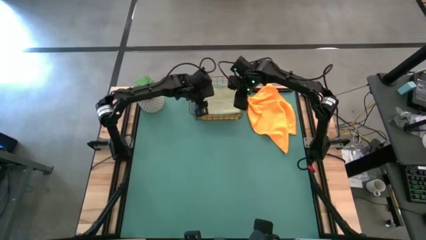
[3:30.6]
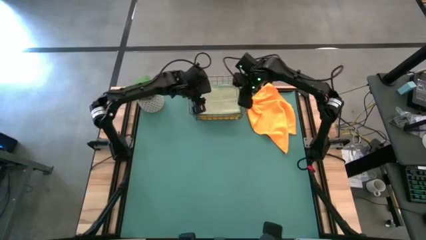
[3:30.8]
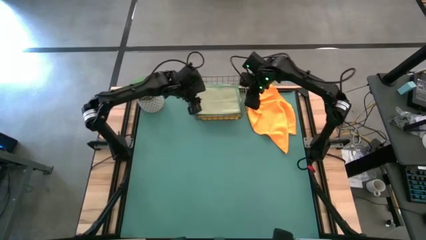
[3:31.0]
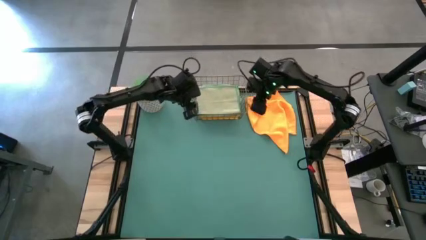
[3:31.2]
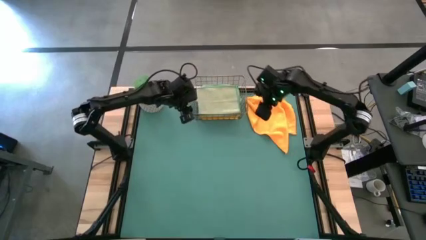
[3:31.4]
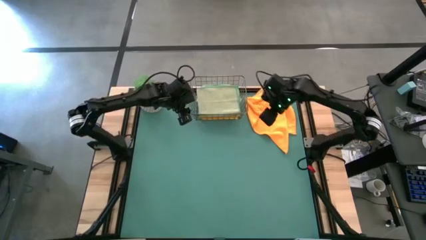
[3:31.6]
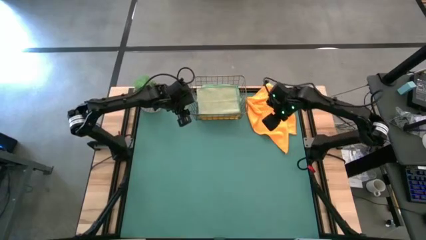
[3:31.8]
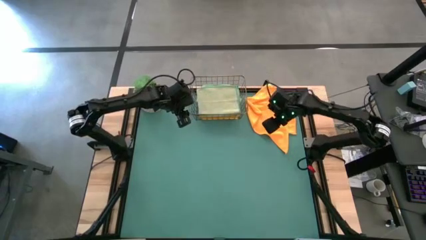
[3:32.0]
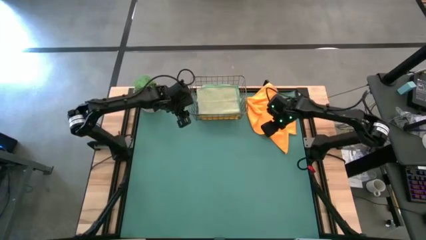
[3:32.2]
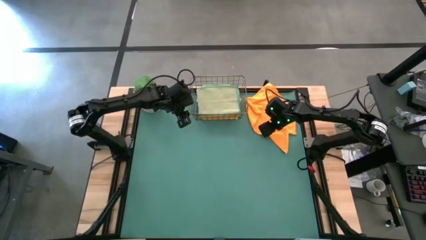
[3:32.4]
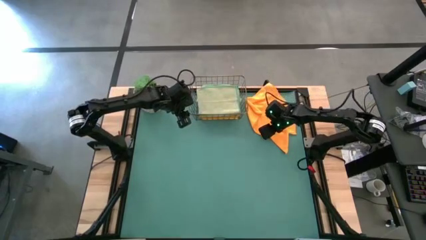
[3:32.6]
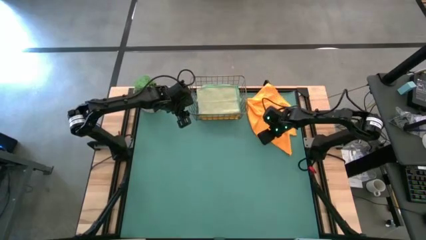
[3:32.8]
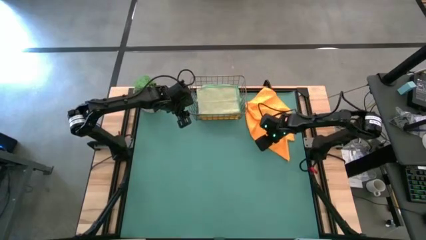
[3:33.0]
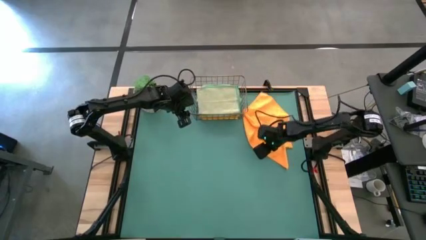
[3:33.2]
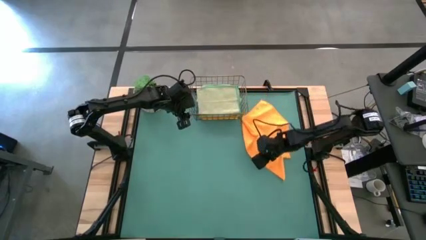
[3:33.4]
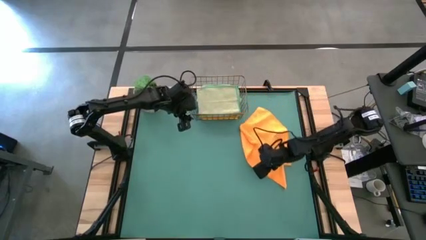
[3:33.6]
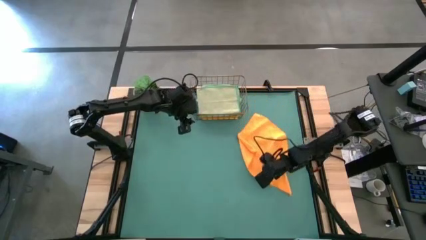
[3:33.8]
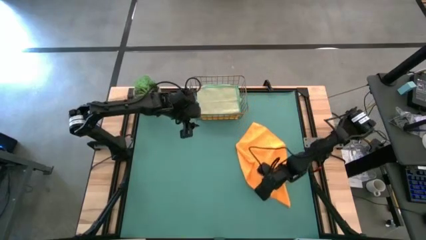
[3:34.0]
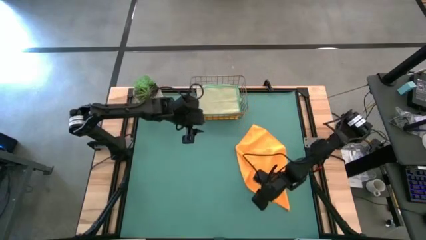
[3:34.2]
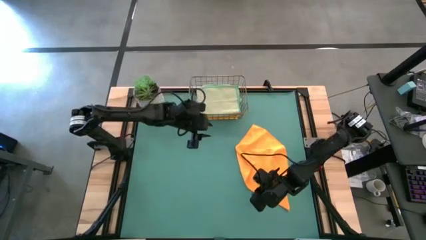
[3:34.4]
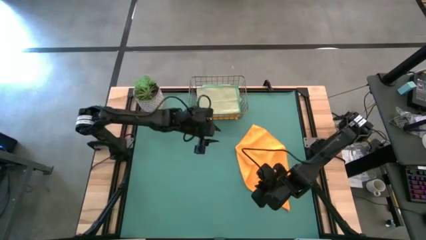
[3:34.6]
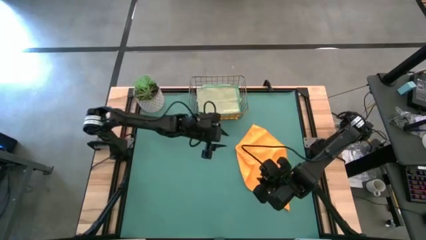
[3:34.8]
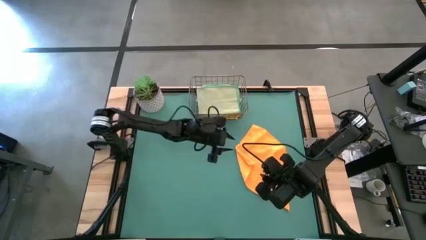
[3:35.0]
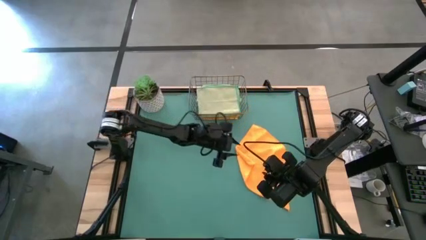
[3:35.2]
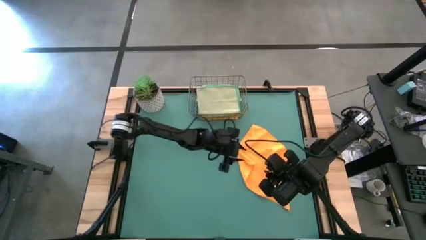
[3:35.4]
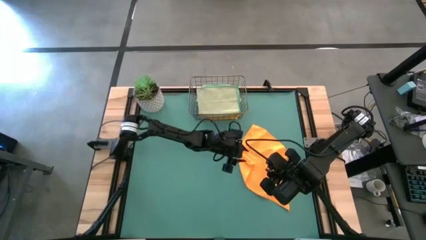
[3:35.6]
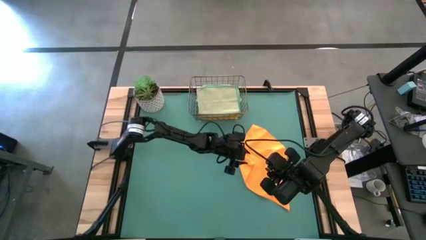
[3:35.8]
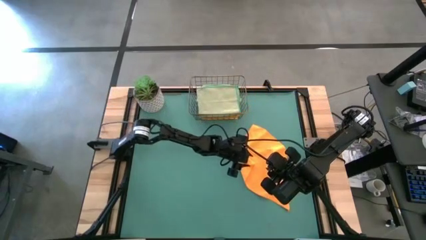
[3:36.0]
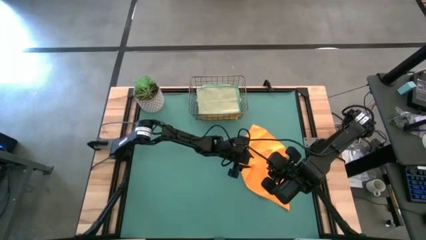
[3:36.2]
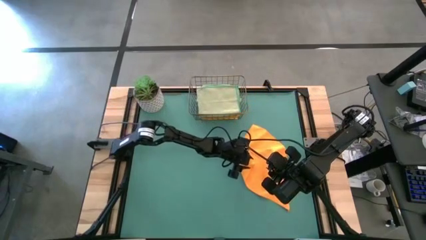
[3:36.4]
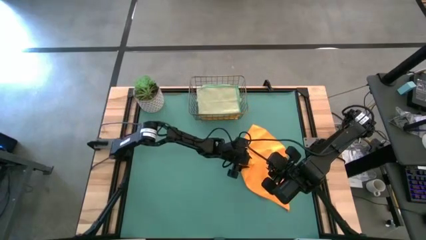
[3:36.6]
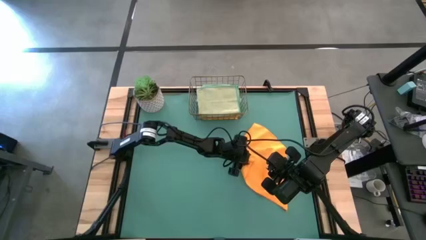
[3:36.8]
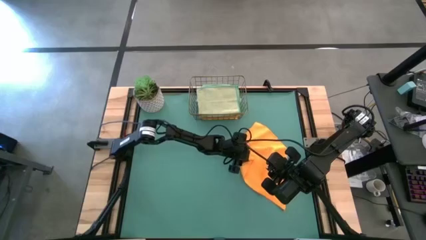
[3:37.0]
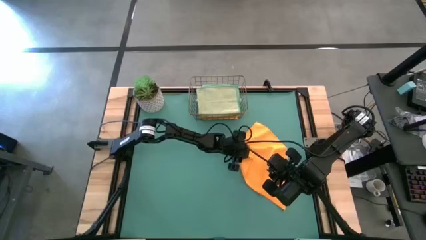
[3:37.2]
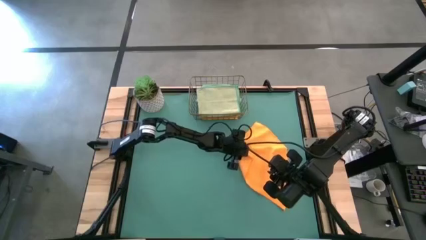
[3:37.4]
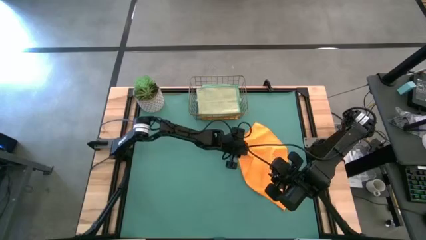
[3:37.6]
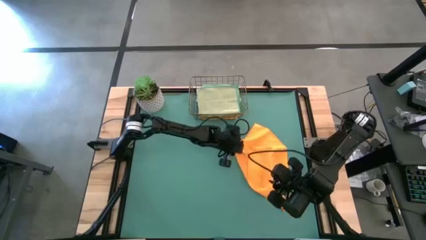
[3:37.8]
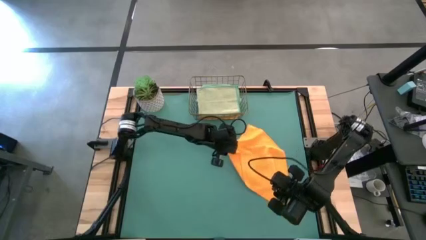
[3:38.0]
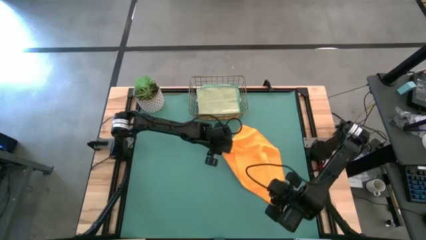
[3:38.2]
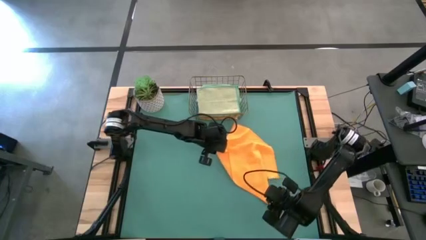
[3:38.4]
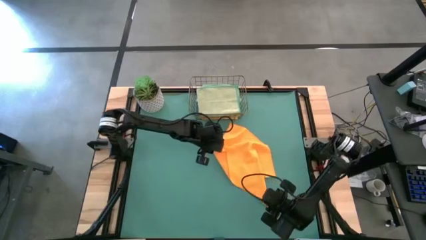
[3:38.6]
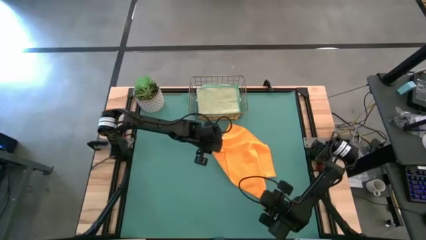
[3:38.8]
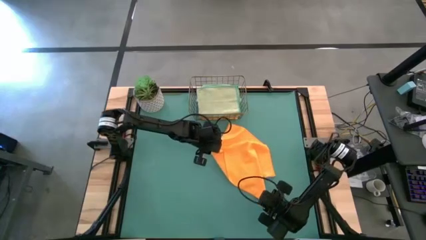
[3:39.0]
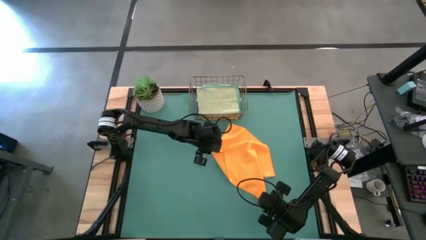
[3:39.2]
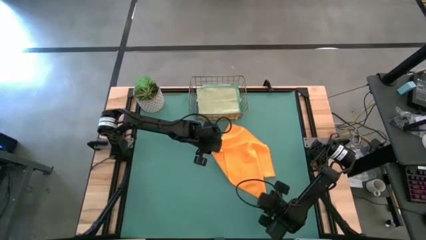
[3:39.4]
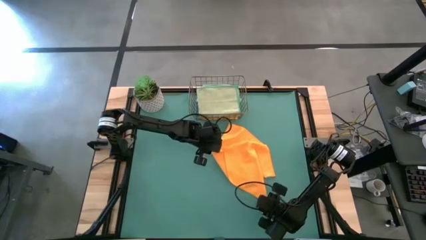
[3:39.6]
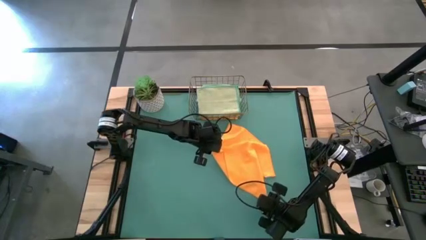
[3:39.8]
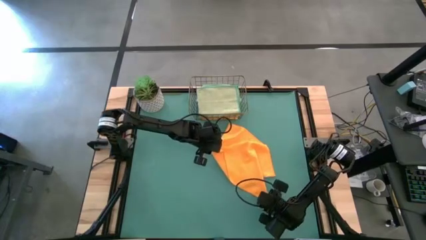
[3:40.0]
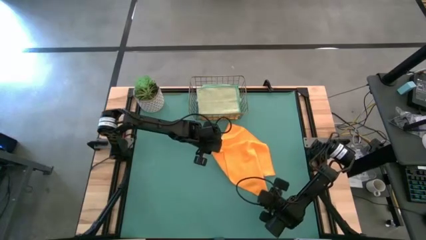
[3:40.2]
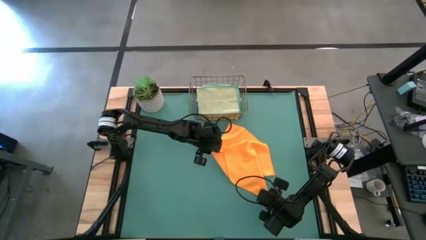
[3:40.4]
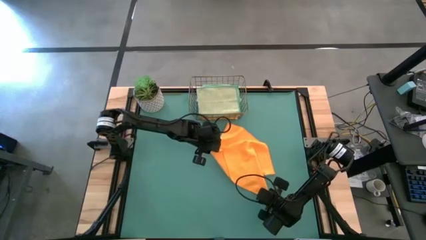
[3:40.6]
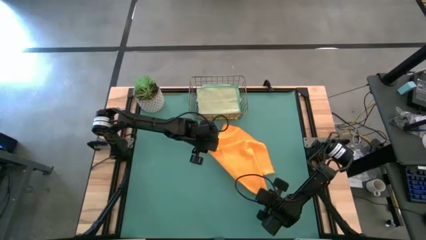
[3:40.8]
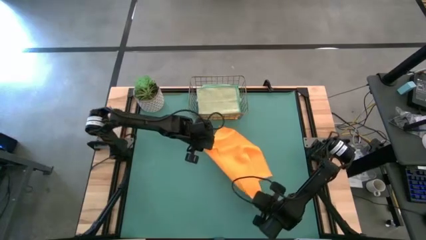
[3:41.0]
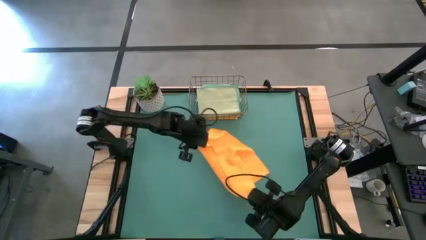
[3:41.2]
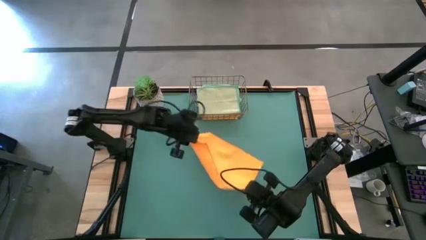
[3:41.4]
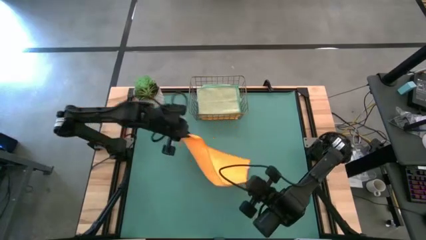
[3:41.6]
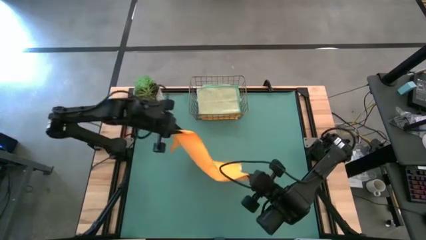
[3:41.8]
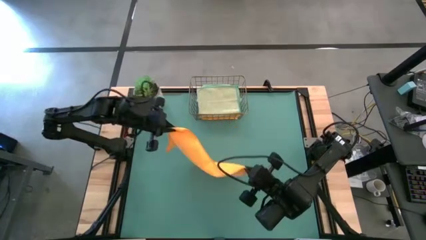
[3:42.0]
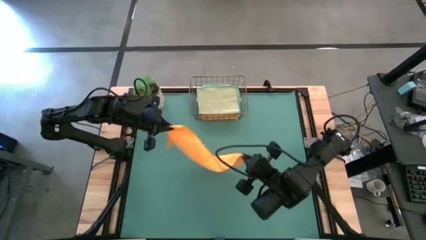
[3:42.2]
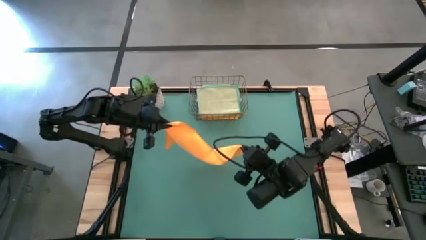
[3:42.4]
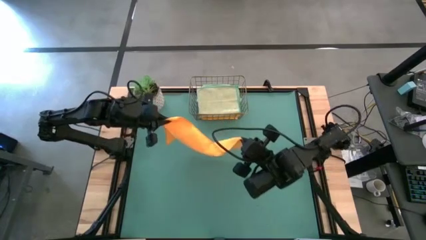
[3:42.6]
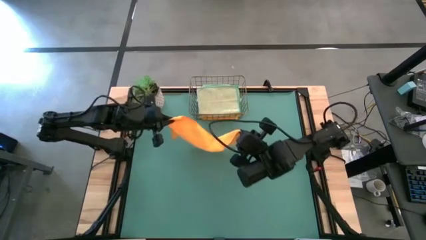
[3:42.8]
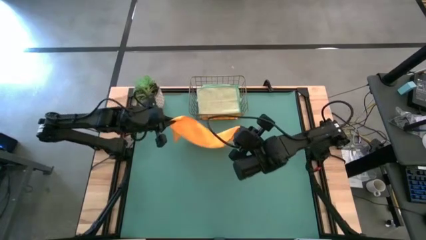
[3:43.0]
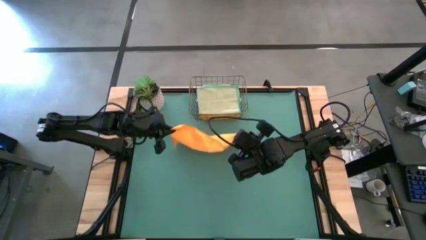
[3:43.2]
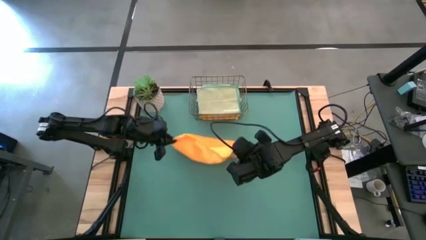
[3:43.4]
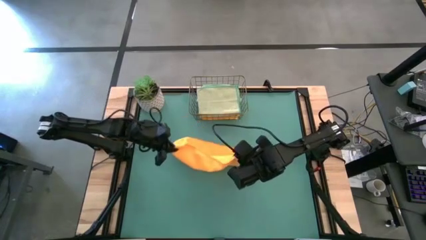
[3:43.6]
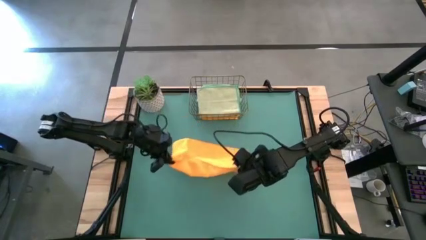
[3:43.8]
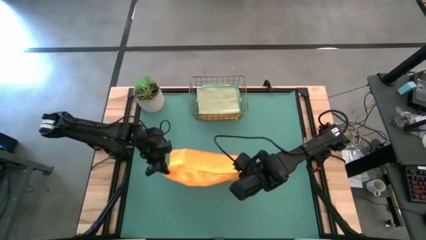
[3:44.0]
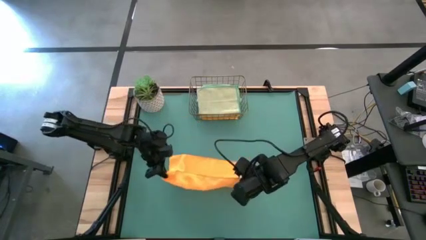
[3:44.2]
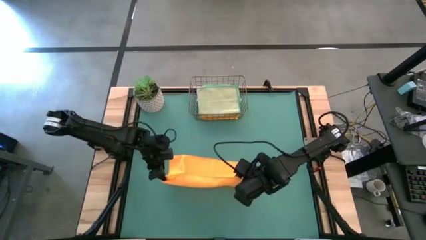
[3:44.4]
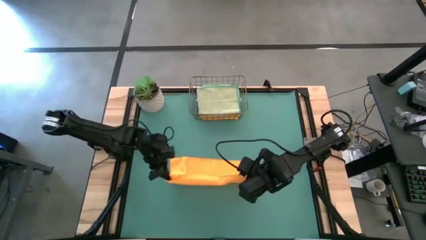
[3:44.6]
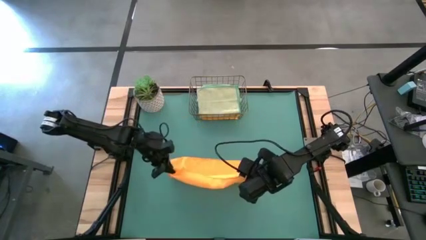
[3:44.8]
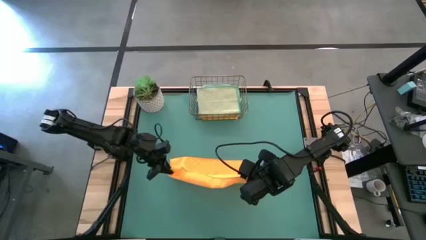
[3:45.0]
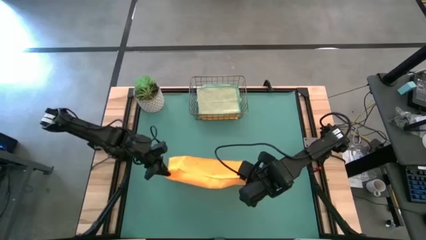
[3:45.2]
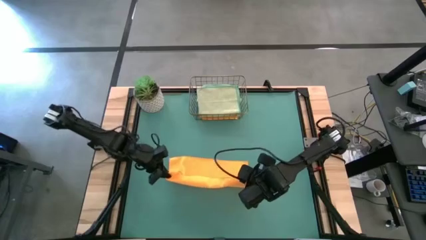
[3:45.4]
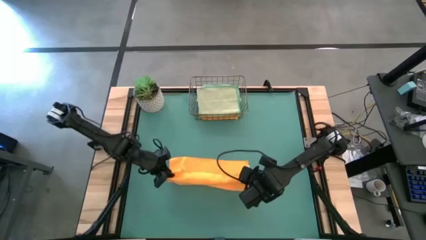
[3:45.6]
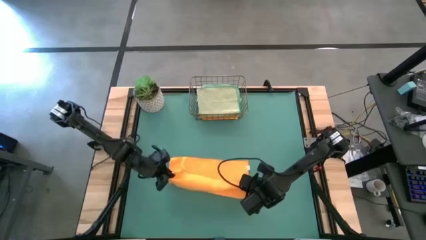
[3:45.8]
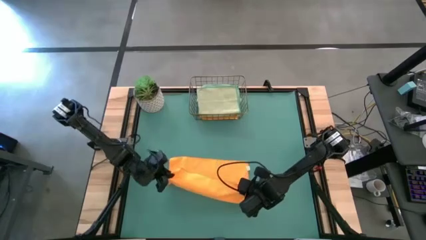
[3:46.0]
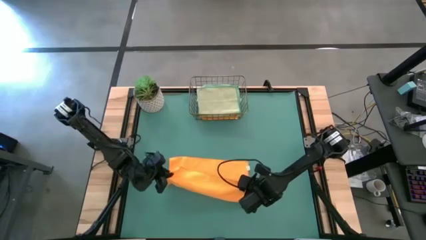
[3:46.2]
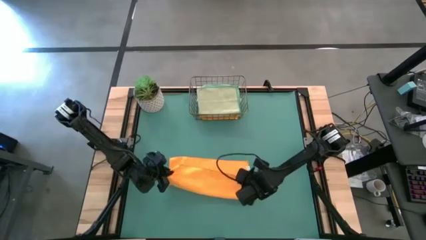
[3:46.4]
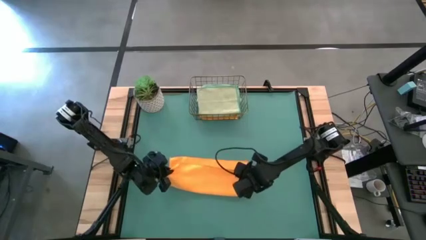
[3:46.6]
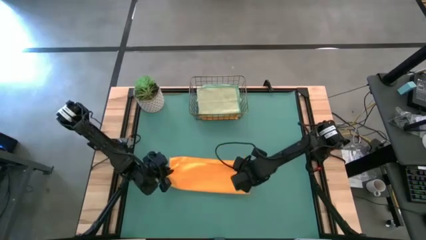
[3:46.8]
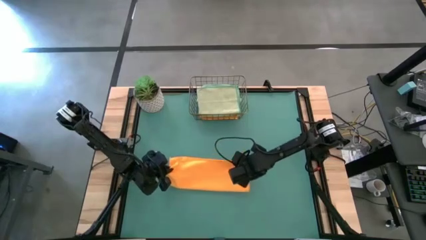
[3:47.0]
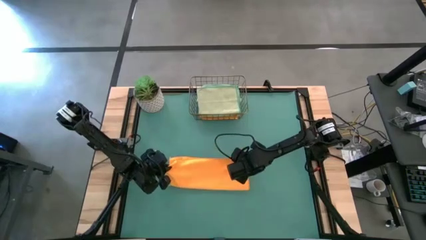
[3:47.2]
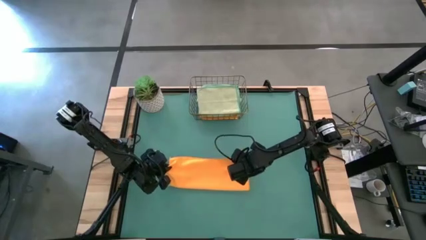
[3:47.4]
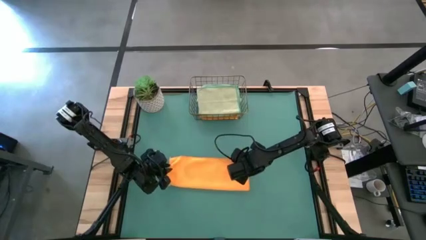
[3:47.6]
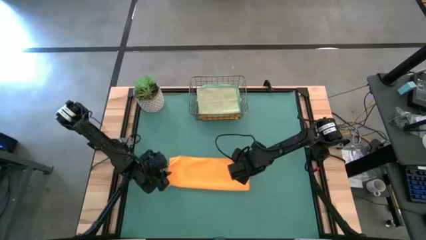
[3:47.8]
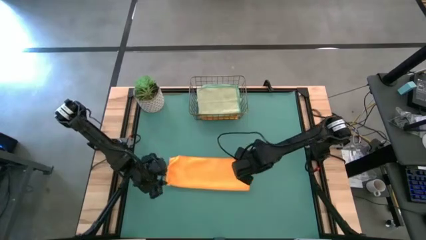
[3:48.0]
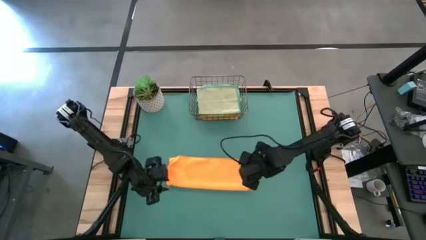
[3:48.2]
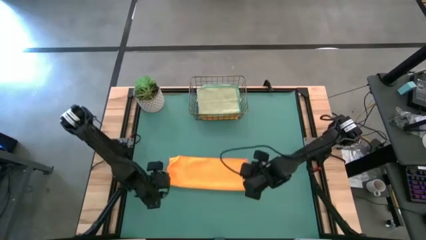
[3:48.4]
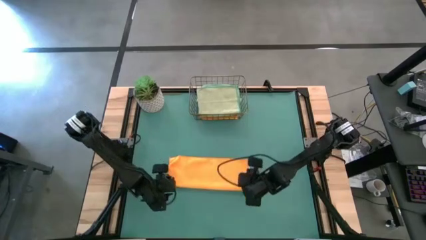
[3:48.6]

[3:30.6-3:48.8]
Task: Fold microfiber towels
Fold the orange microfiber cloth
